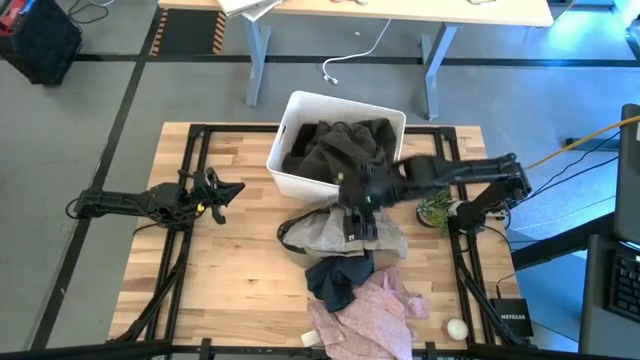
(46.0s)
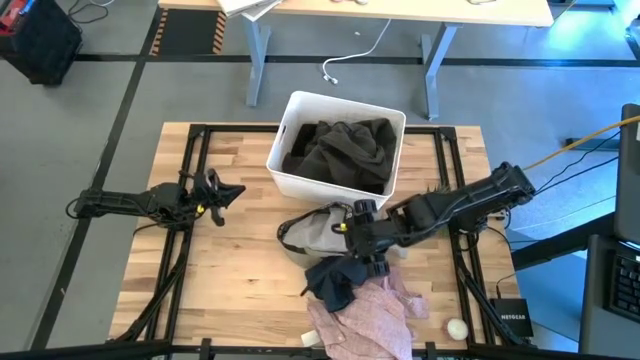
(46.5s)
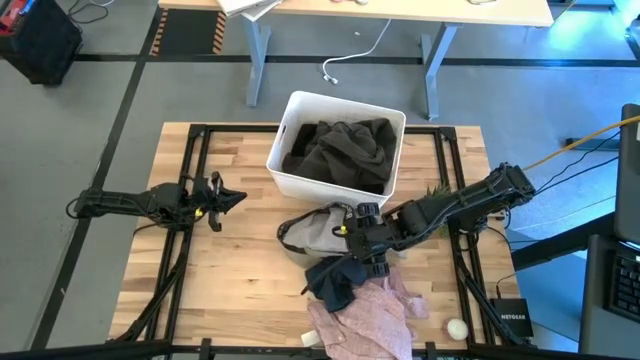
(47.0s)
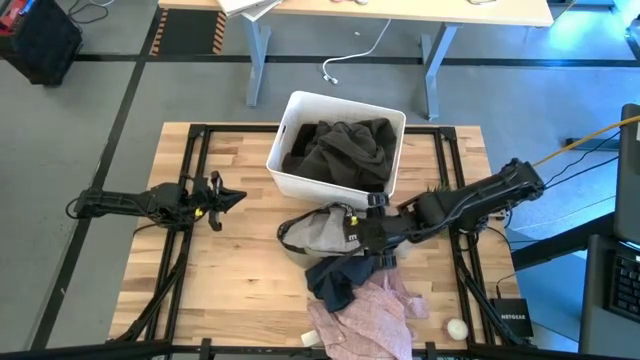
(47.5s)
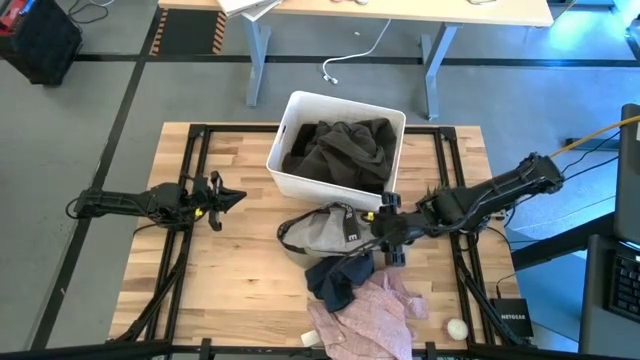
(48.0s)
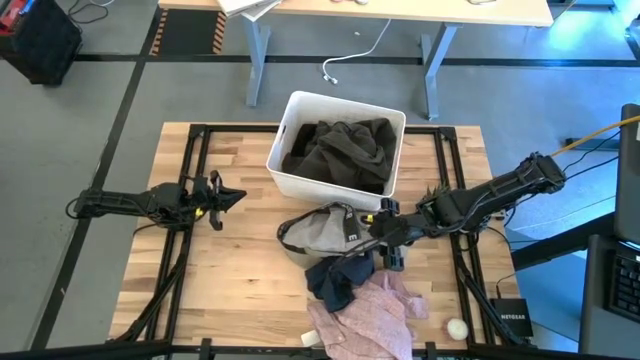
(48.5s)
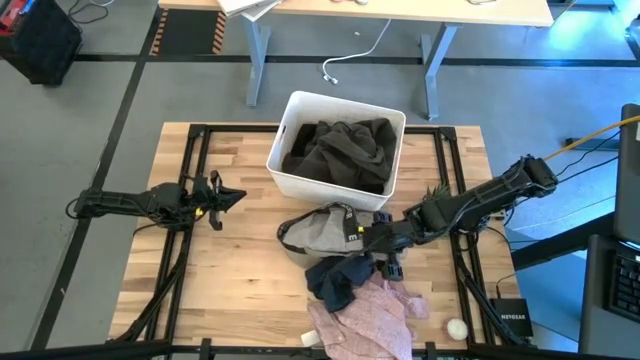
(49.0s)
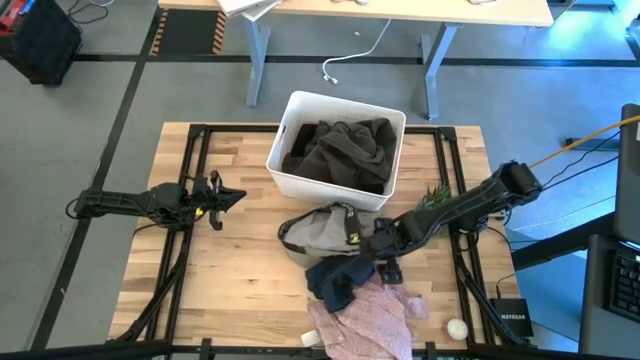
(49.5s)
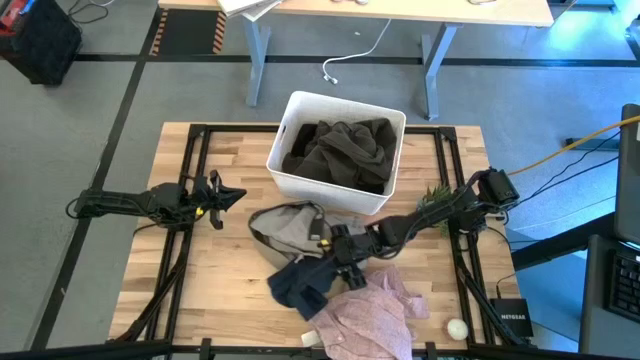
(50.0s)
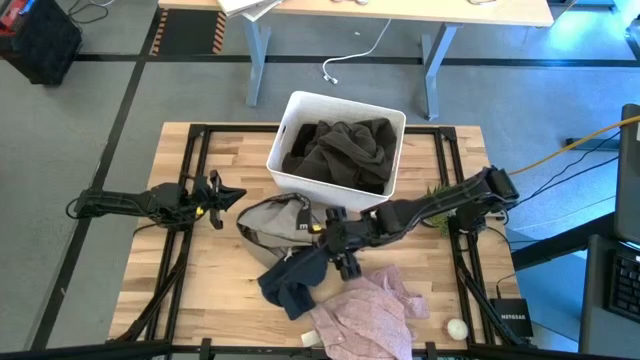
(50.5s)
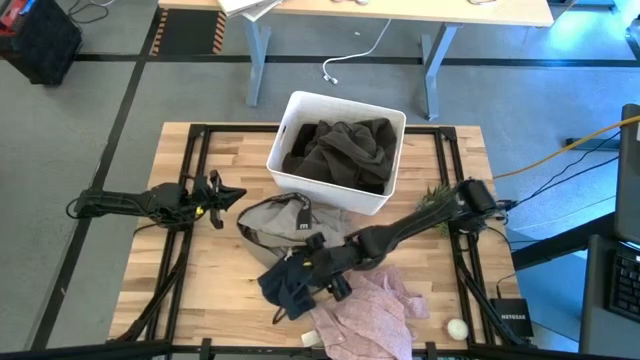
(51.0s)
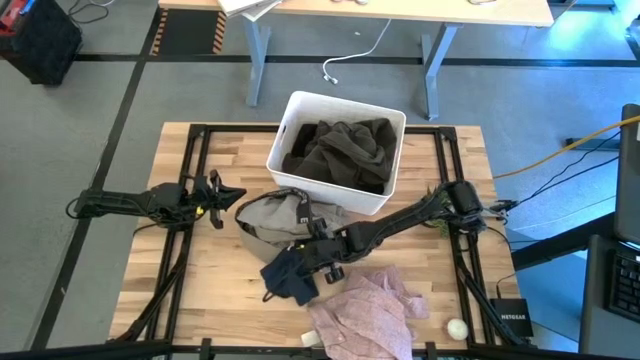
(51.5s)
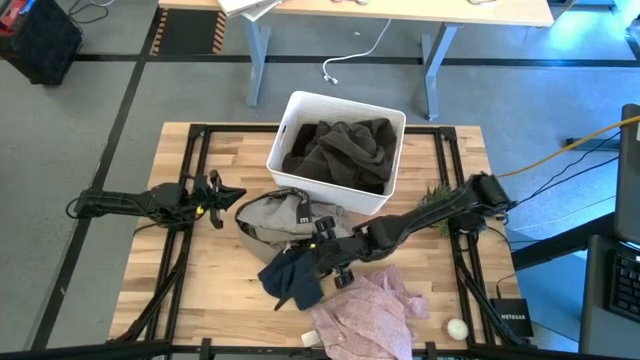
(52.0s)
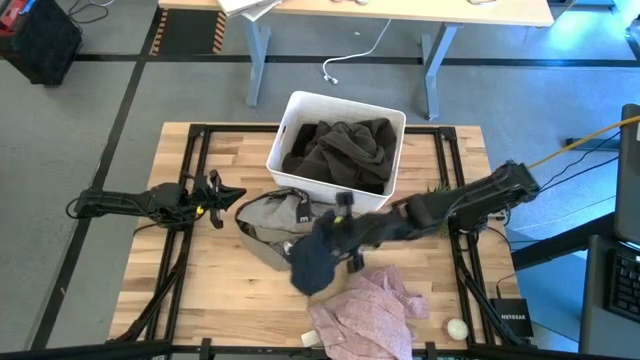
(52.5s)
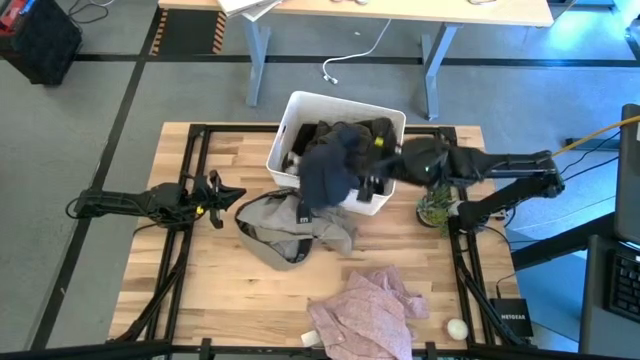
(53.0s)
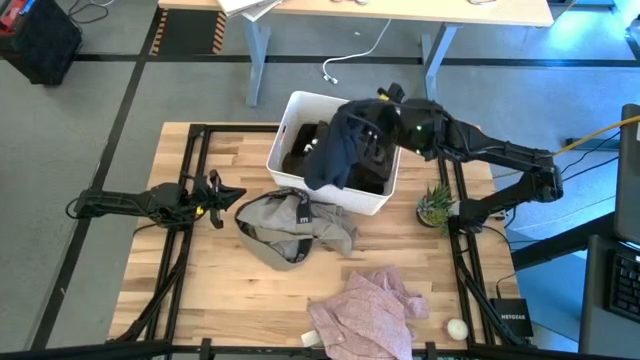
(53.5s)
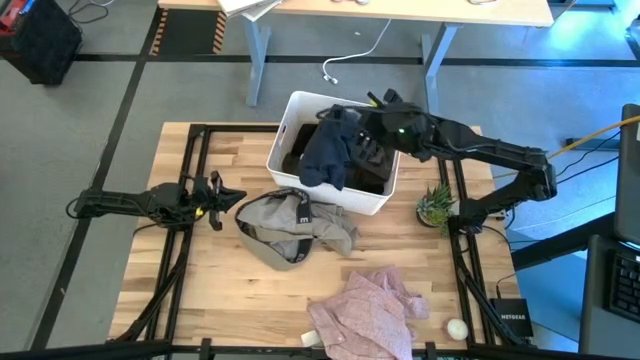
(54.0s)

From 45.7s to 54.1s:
Task: Sort clothes
Put the blue short into the white bin

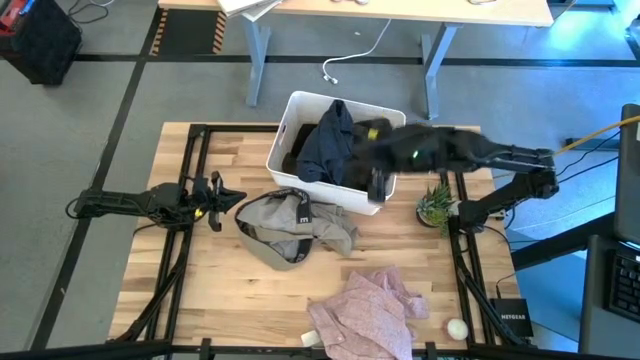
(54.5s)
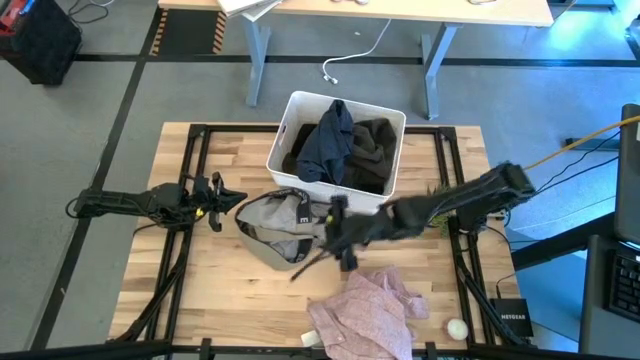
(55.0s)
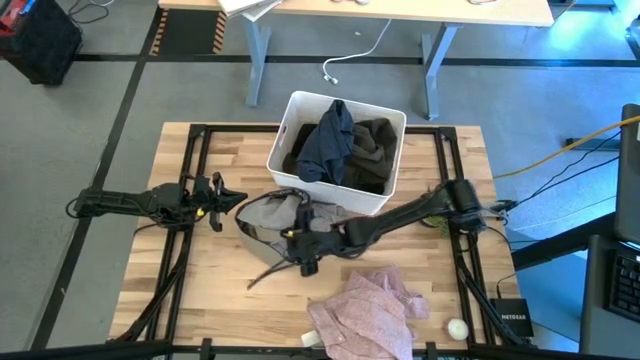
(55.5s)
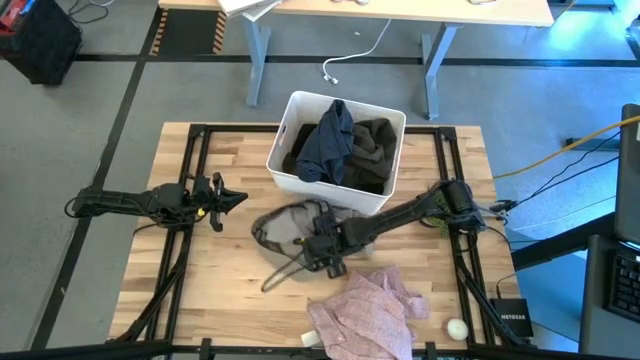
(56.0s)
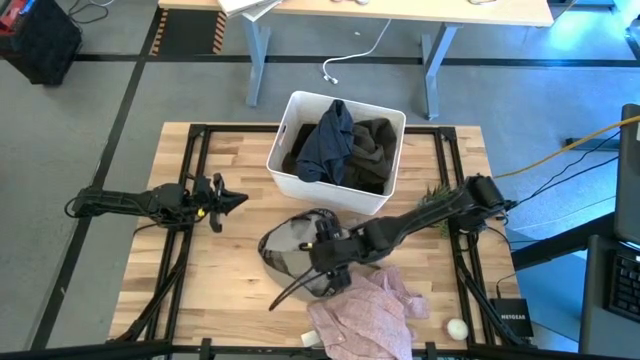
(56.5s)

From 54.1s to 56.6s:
Put the gray short into the white bin

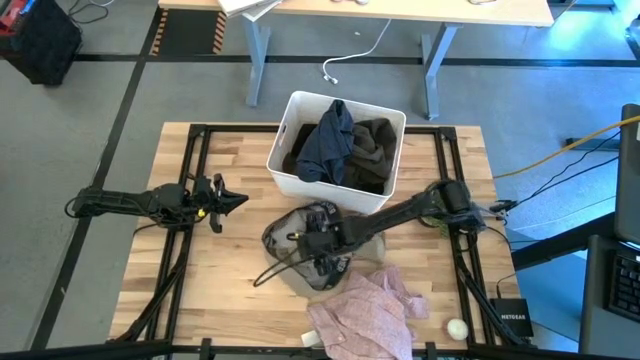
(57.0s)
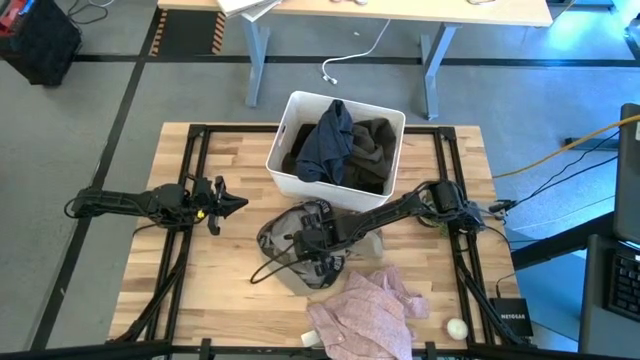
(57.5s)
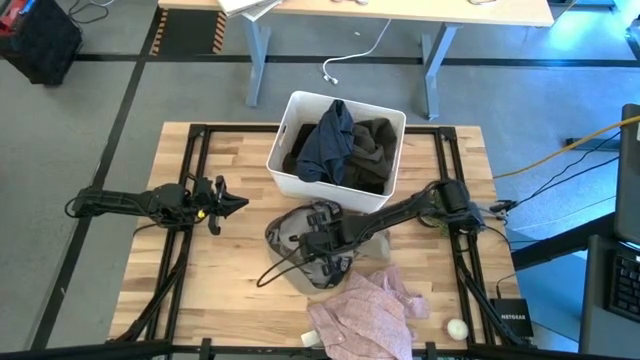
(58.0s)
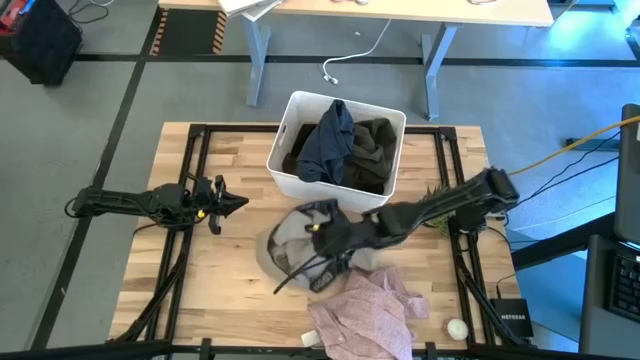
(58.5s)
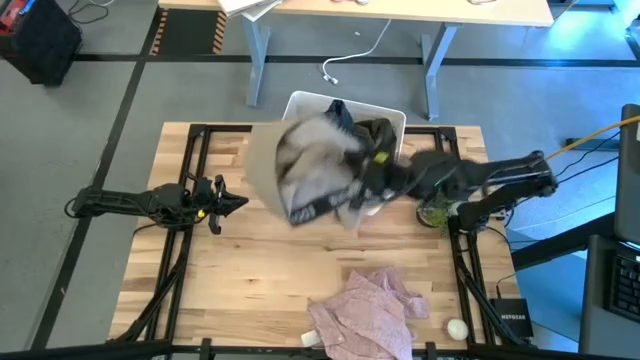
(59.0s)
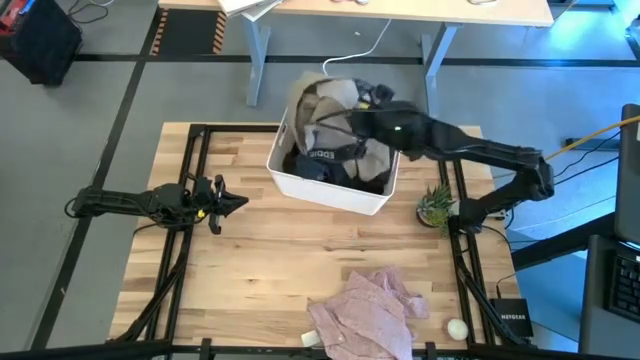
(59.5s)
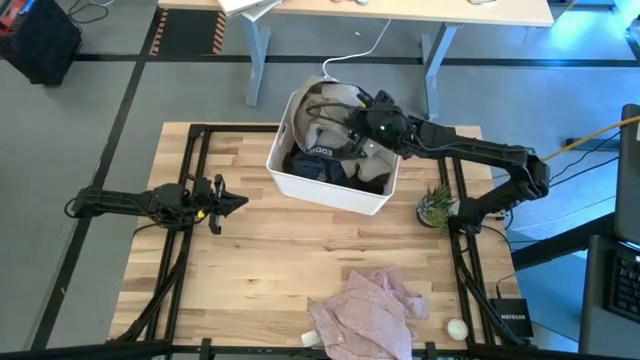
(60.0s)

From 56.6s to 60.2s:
Put the gray short into the white bin

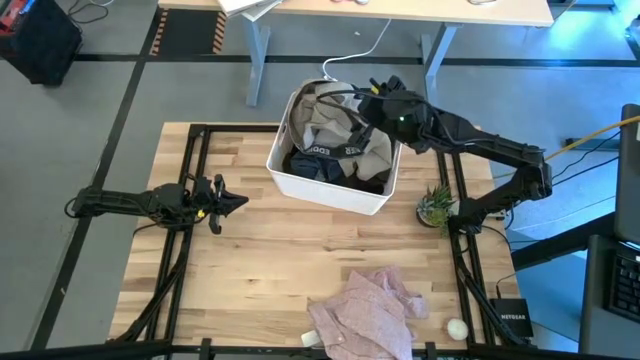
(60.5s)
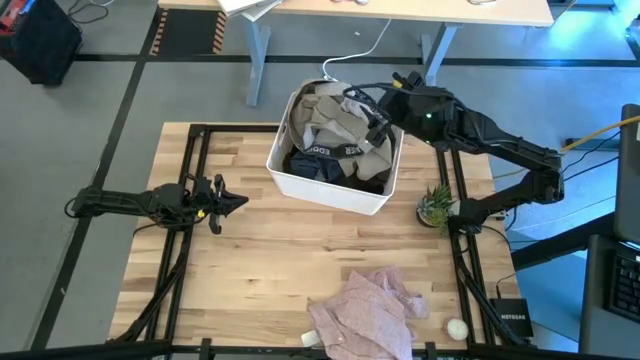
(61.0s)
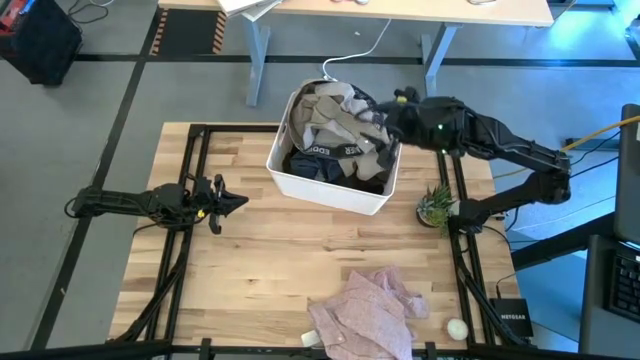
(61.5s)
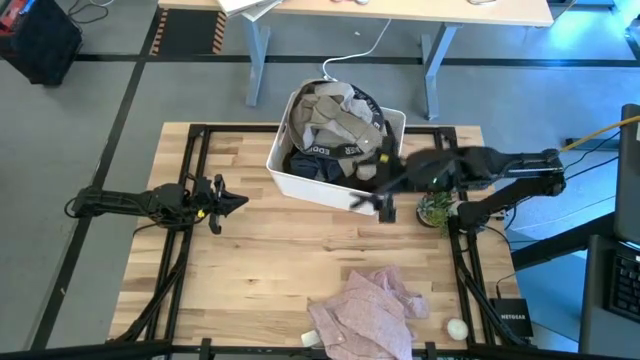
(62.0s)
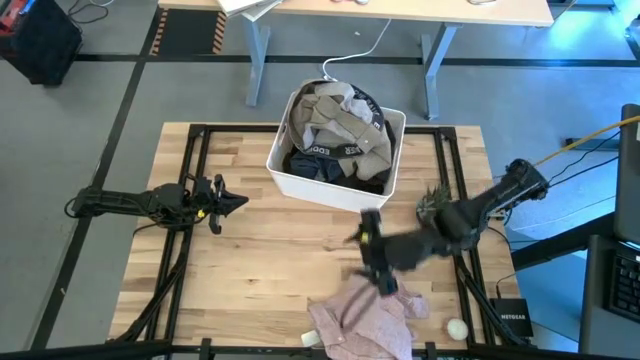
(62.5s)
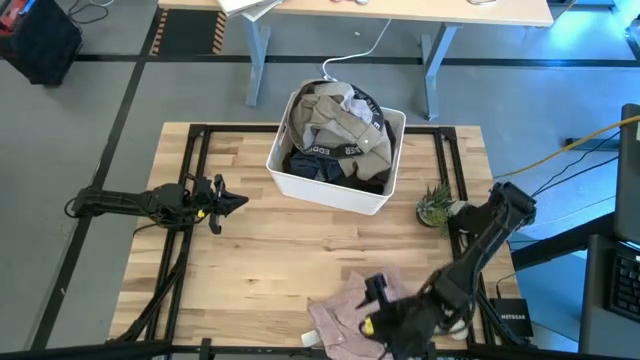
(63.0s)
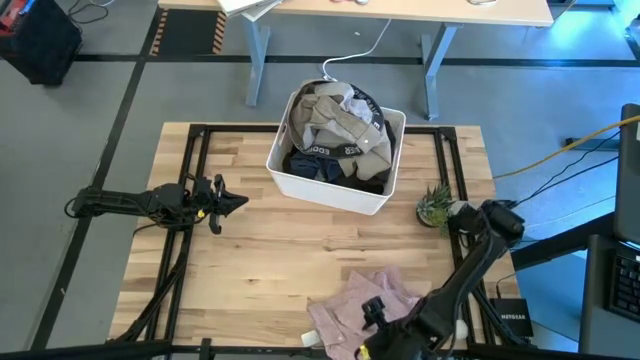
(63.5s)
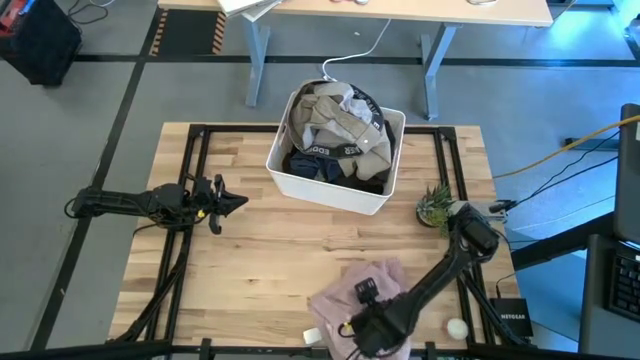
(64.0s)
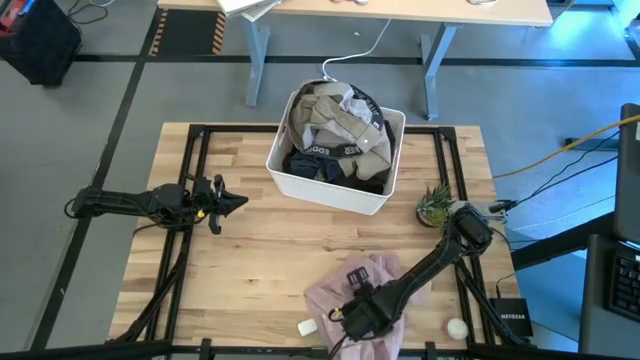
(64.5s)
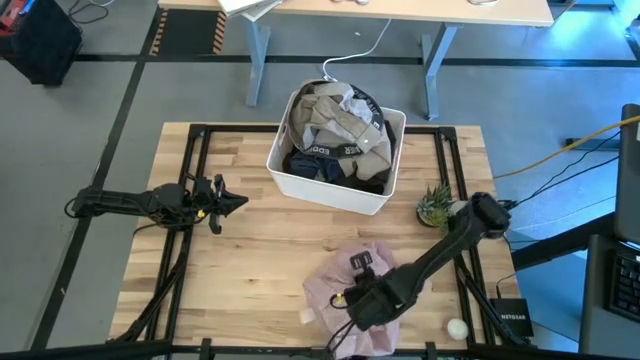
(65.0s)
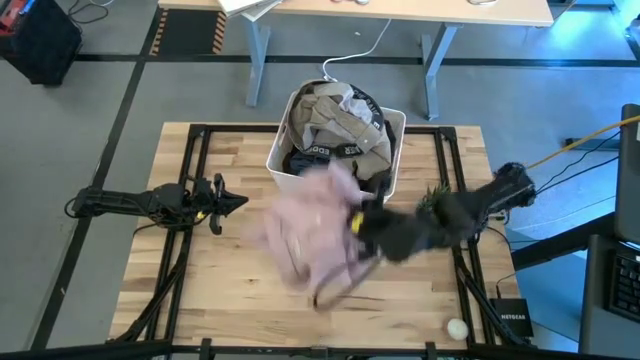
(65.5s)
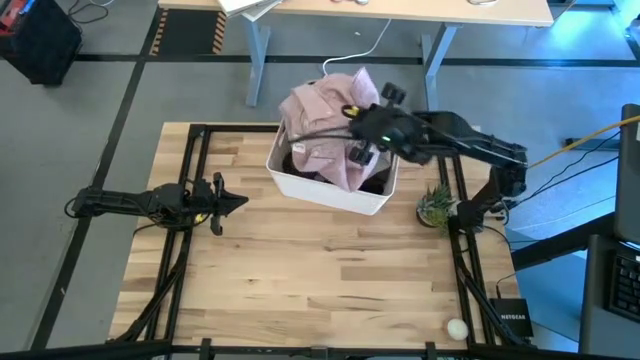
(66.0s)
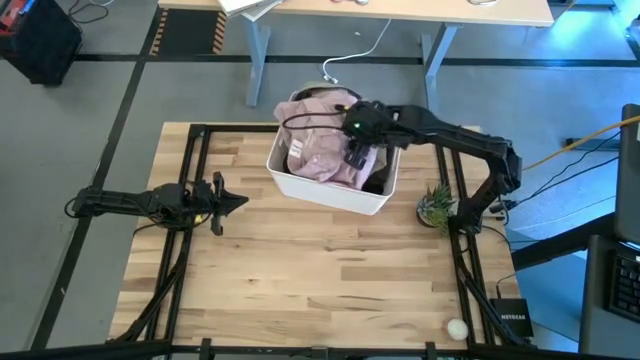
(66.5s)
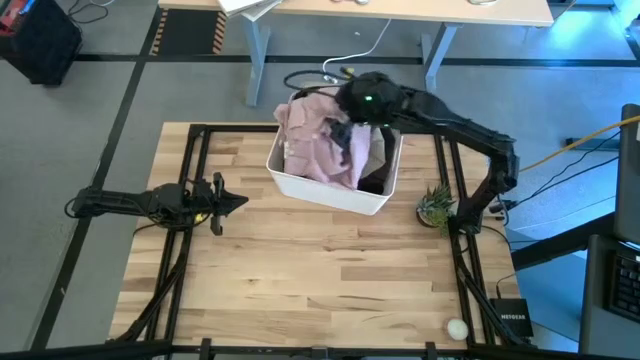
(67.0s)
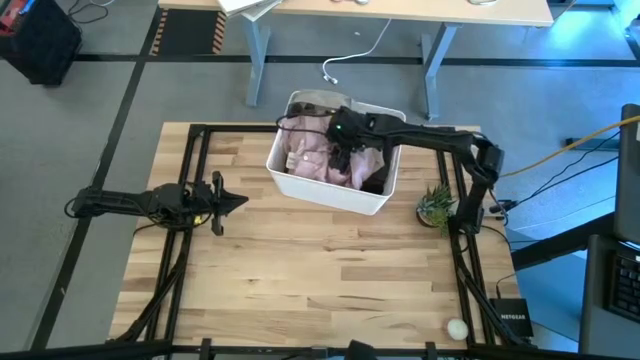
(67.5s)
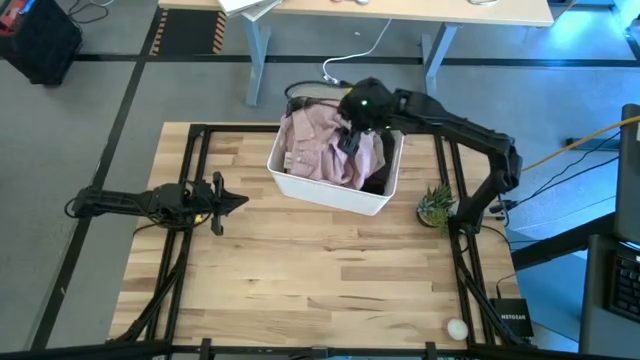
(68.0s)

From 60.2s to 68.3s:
Put the pink polo shirt into the white bin
